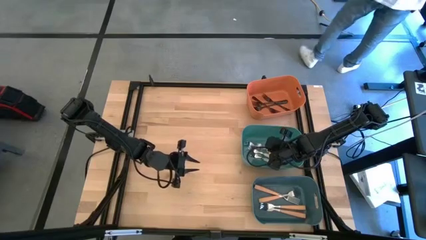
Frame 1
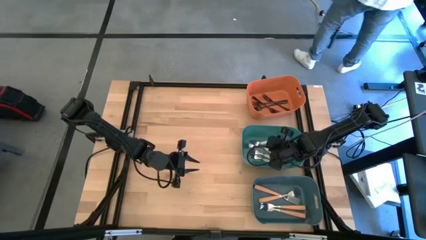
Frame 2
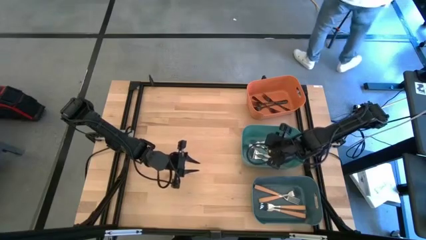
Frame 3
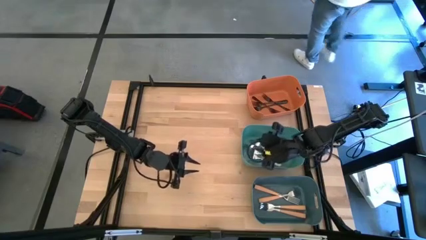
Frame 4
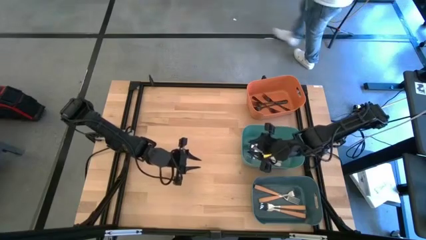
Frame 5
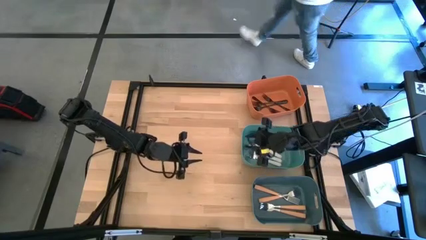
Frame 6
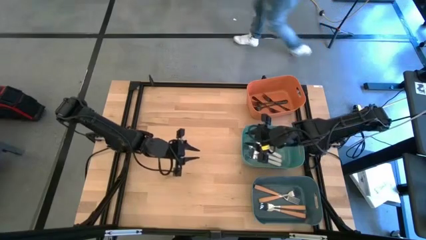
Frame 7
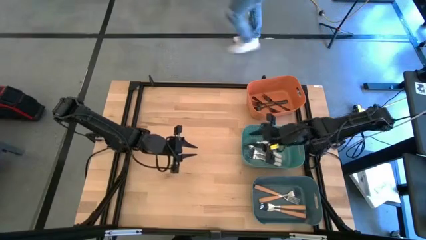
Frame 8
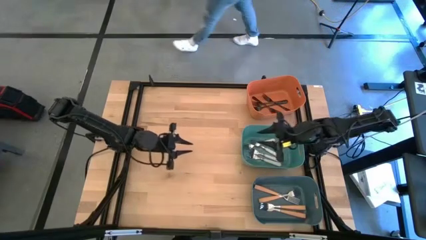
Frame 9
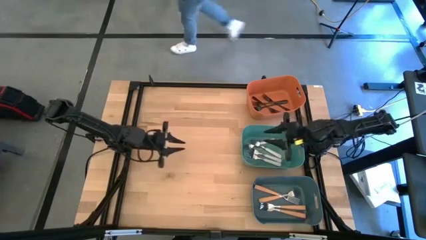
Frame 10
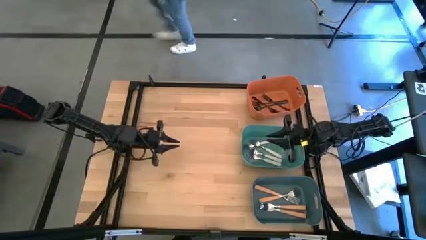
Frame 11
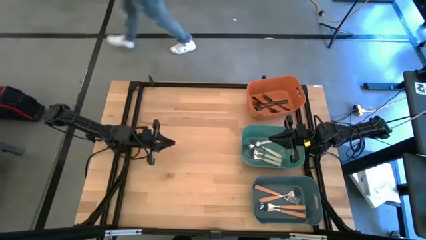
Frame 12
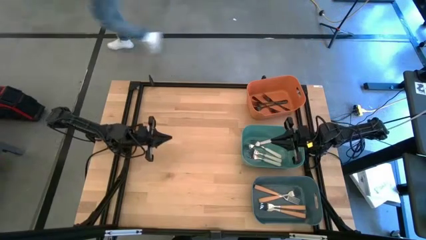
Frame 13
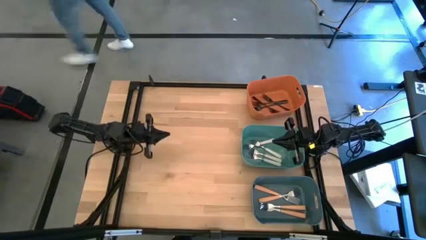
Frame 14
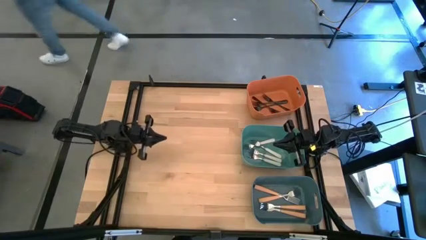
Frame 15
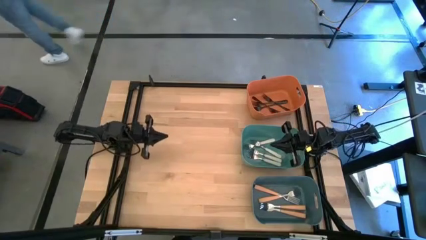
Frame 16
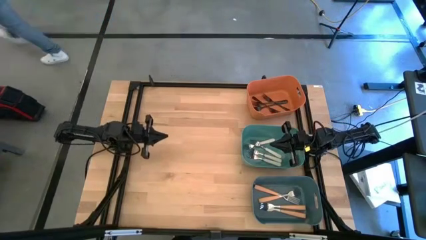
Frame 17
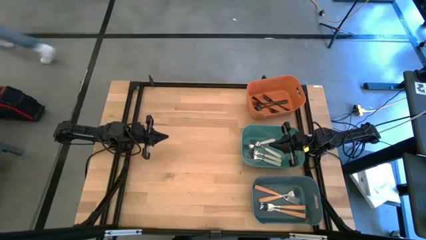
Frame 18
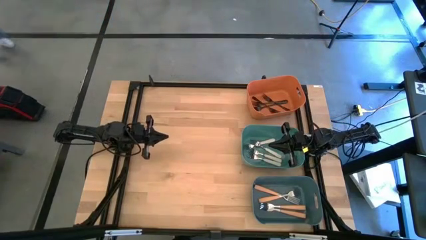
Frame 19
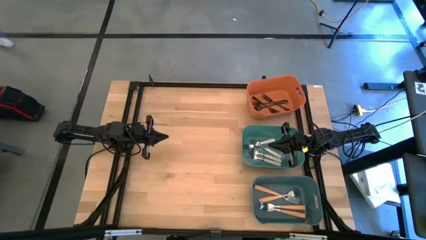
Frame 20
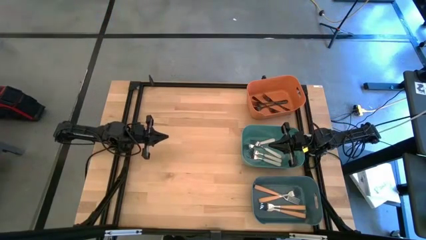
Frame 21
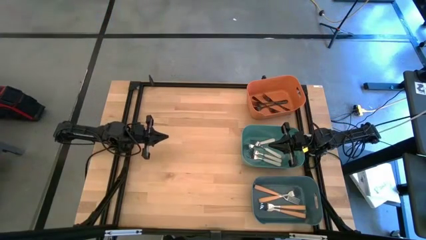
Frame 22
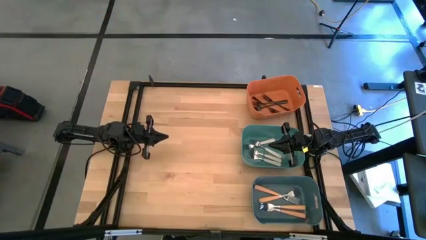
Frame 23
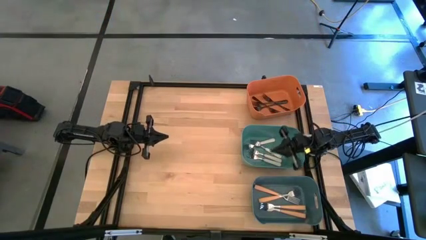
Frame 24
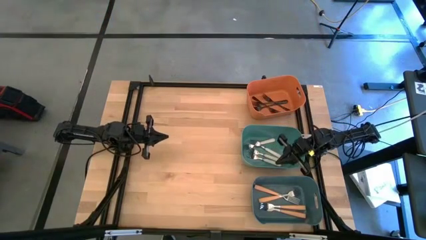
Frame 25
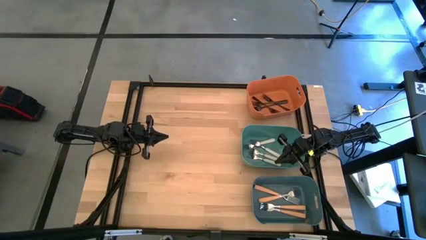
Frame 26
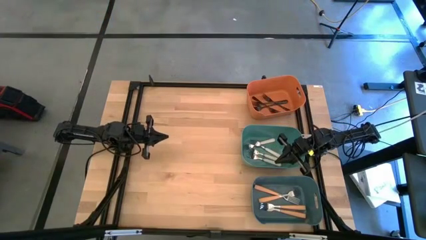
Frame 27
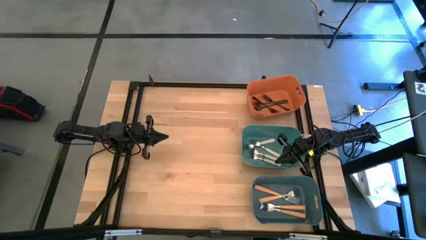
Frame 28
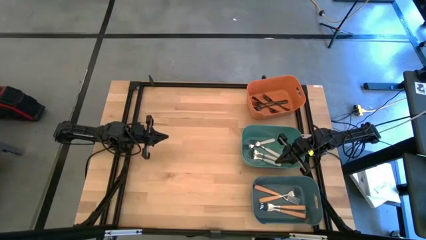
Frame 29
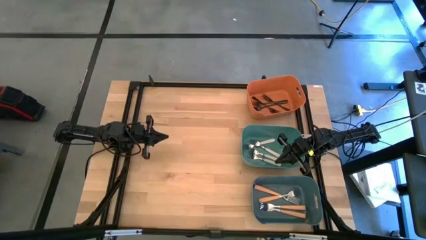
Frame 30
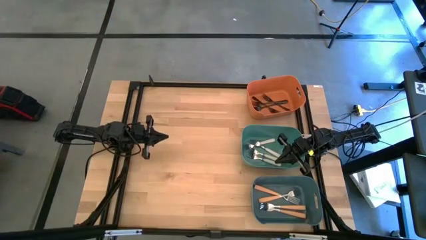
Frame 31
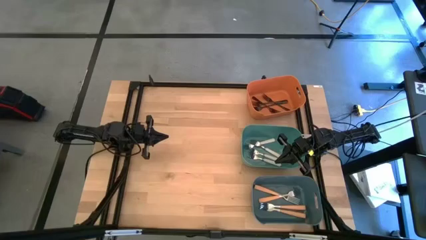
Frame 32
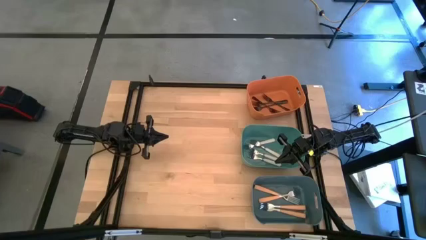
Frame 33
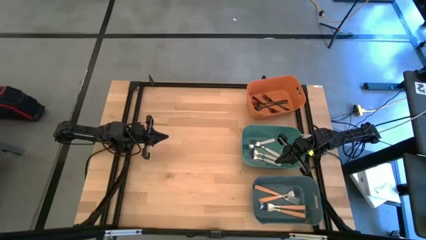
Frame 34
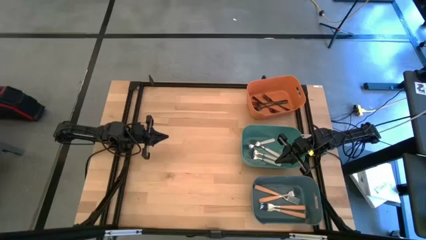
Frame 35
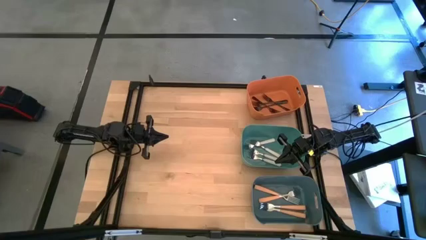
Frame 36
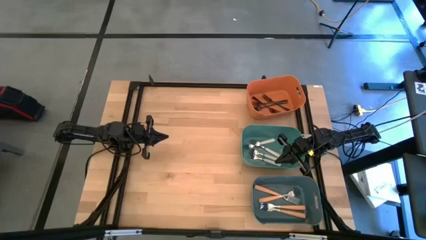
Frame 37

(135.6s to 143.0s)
Task: Sort silverware by color (type)
Return to Home Position

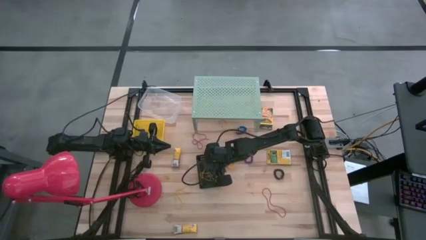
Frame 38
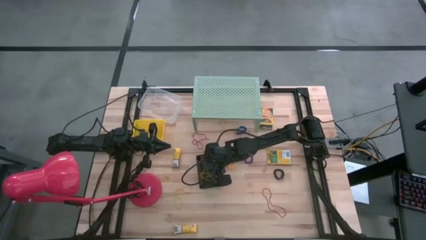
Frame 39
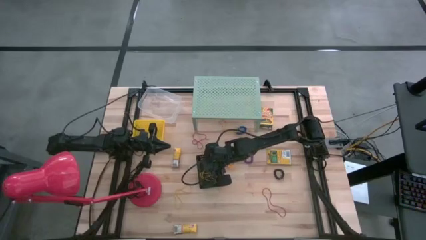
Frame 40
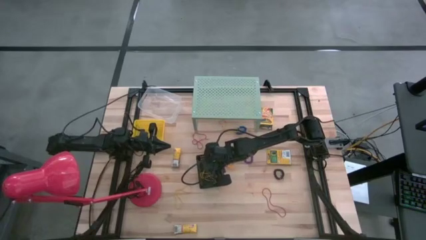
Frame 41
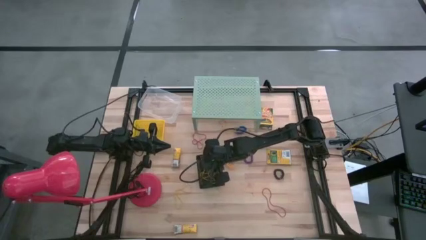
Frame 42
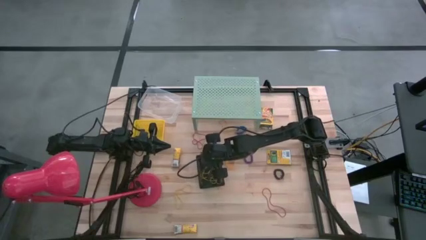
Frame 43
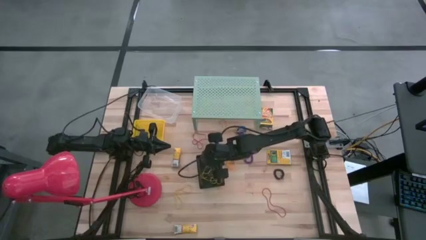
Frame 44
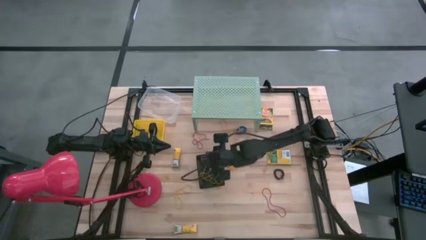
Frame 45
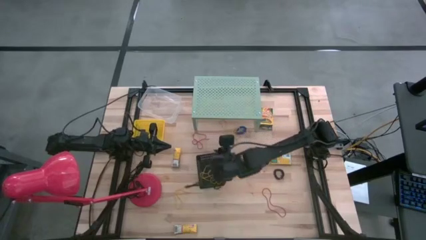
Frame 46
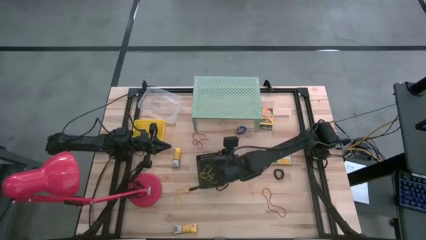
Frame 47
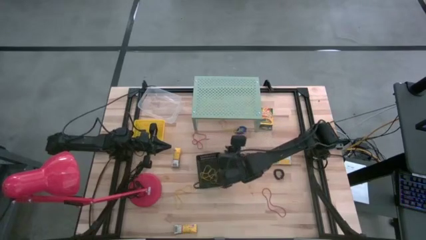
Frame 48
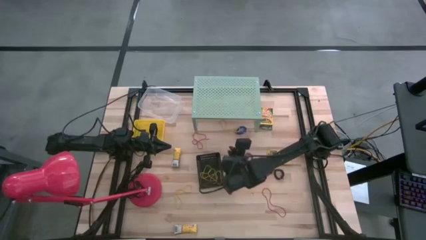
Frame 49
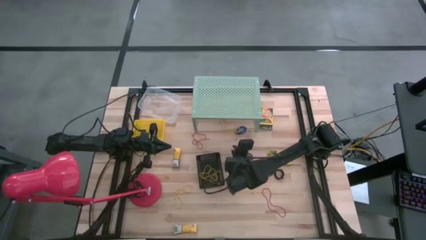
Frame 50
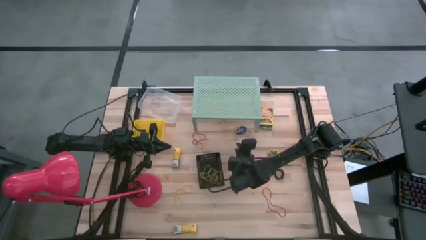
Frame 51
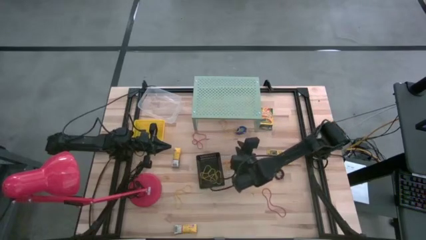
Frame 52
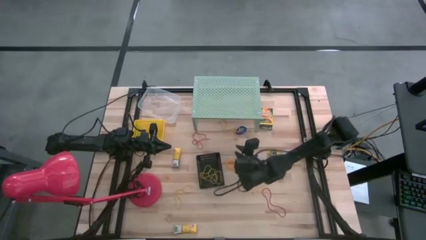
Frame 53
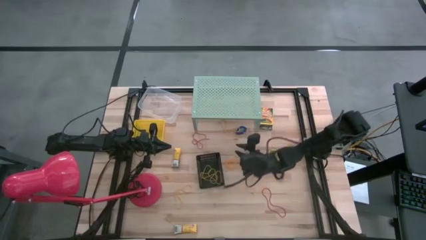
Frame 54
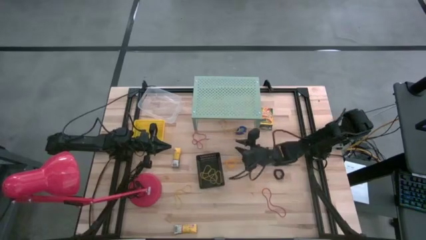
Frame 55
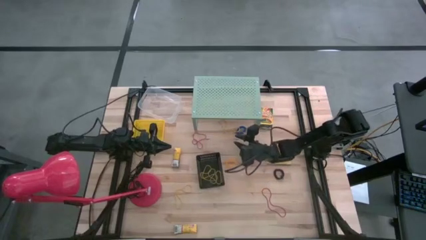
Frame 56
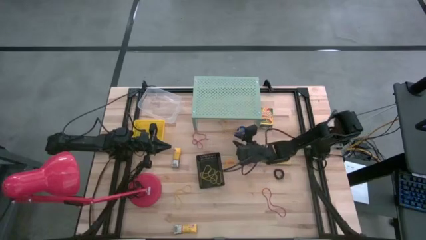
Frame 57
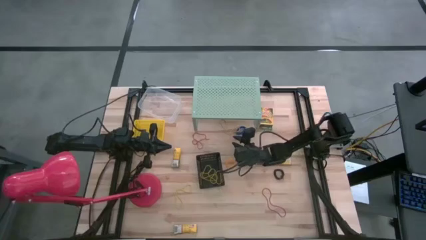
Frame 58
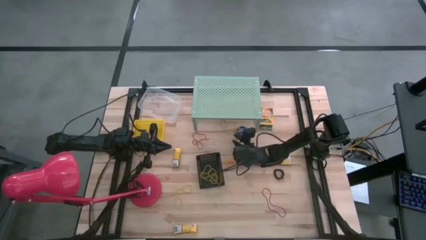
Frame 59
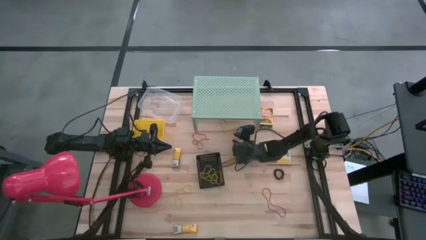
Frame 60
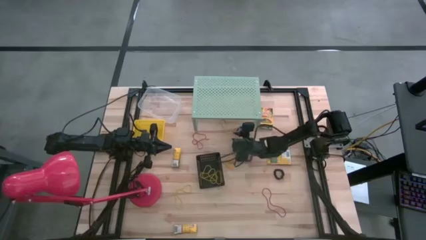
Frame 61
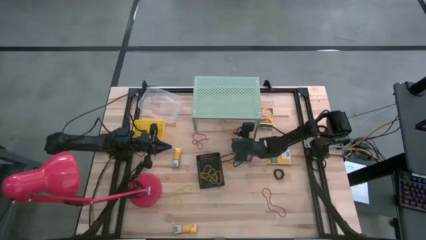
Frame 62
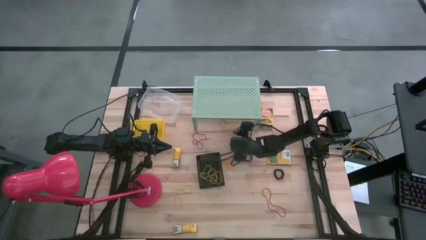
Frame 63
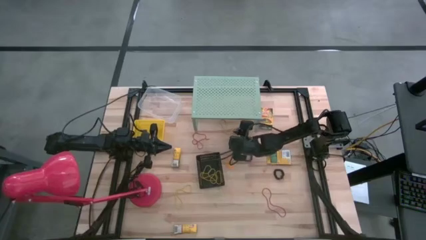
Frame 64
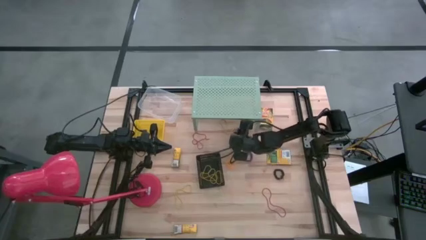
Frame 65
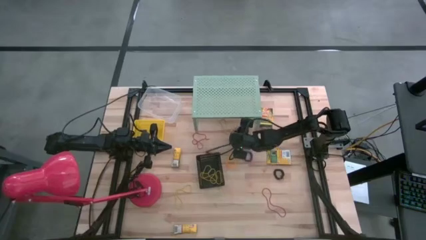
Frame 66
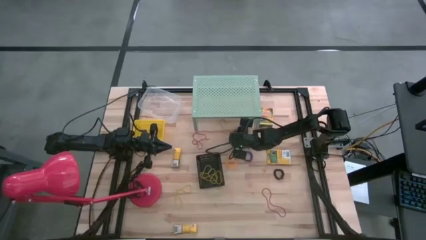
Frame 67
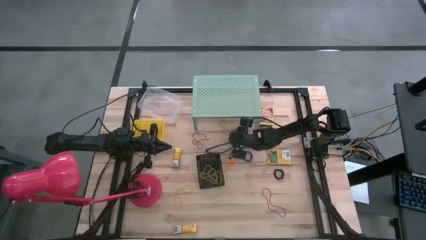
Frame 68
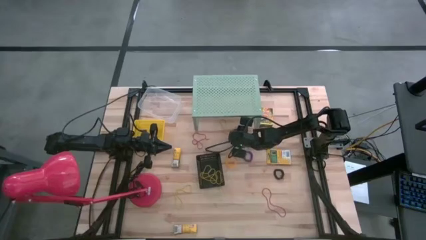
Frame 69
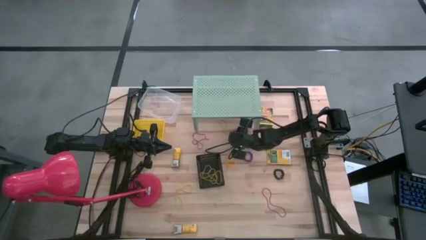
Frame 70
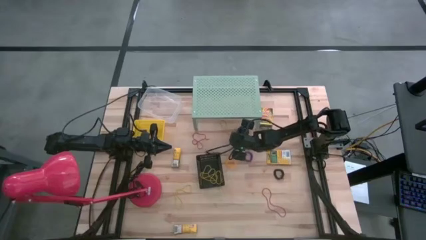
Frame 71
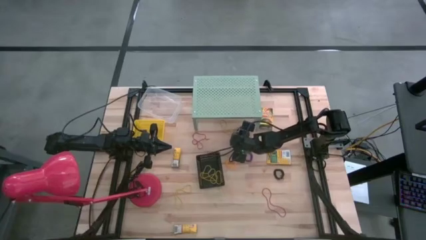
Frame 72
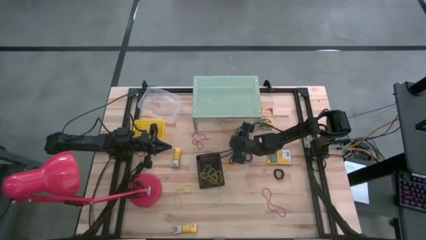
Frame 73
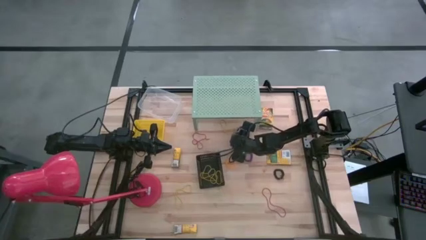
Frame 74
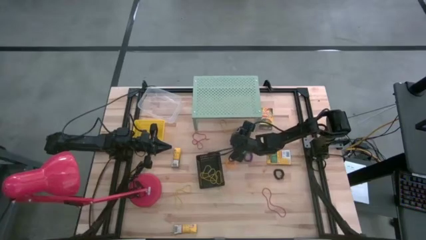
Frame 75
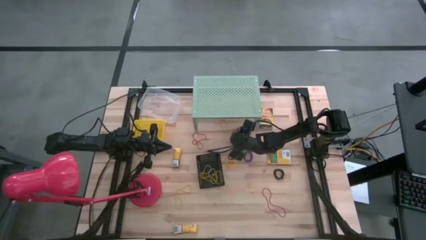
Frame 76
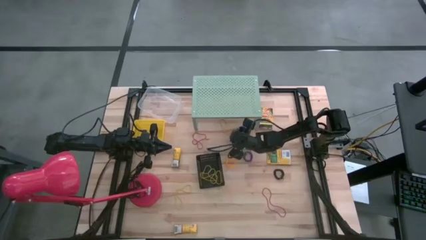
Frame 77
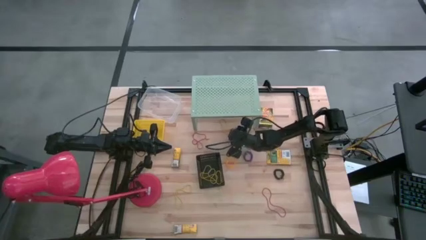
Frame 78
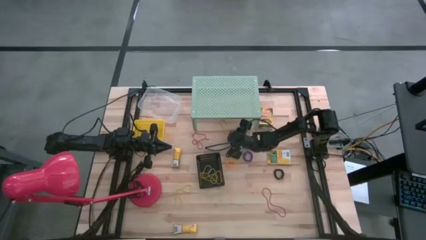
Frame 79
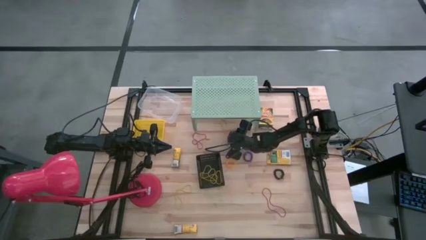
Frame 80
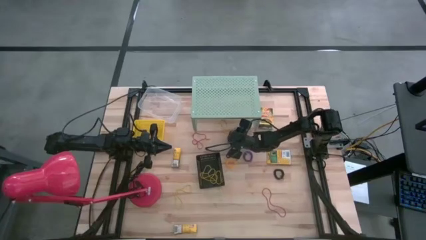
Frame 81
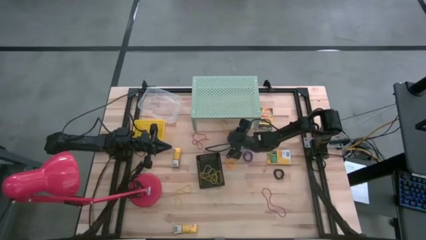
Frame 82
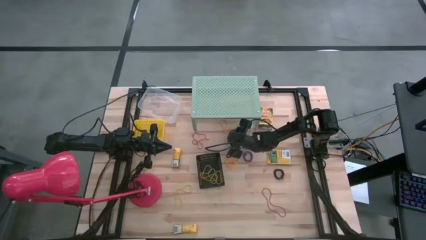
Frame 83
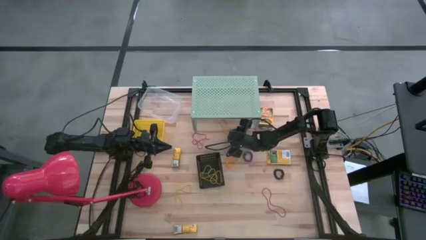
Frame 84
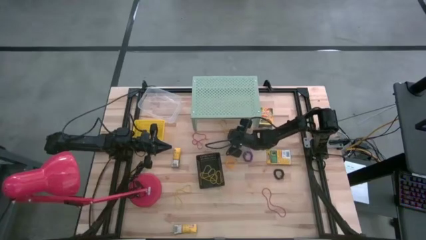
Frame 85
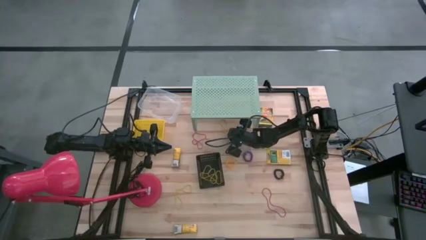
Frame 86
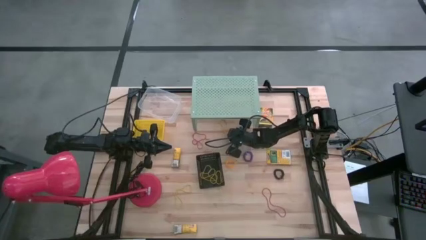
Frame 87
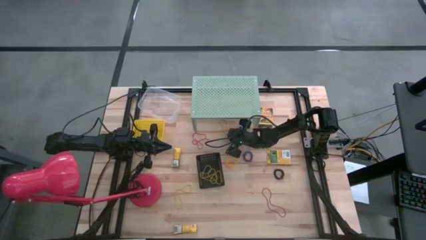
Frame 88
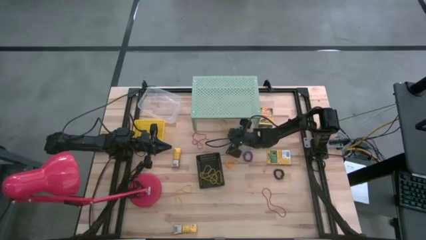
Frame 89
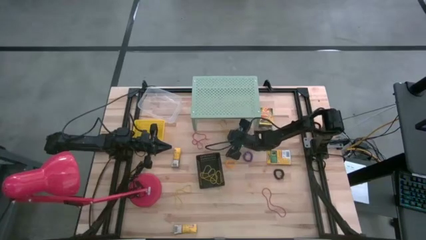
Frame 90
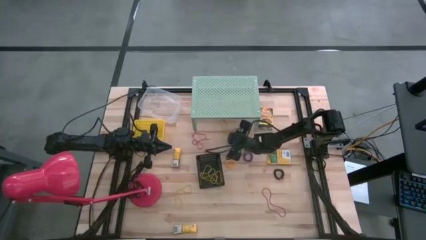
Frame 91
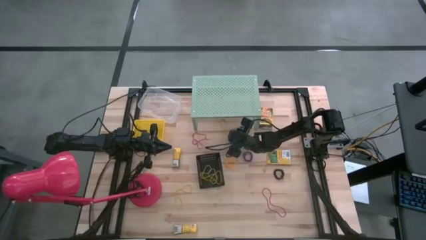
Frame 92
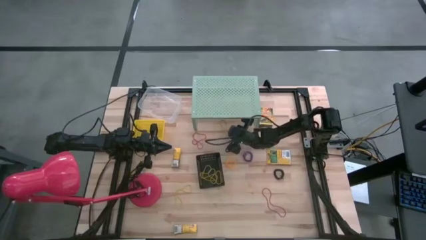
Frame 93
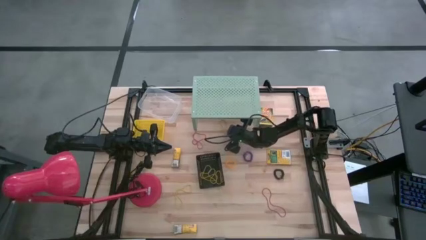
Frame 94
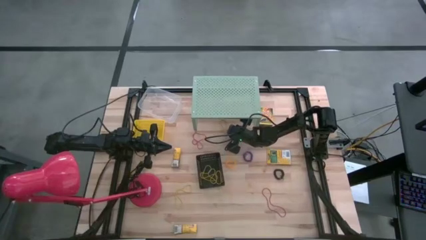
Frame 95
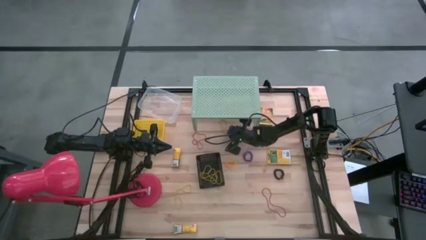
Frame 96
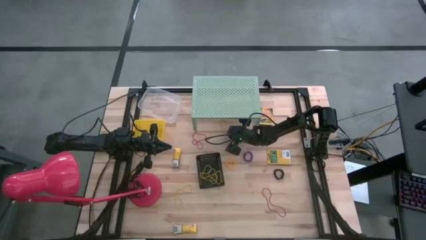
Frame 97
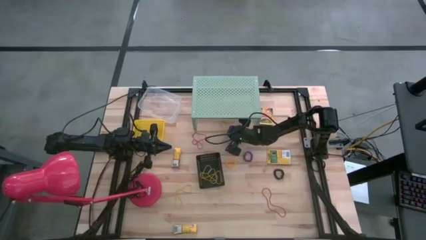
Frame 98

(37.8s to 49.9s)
Task: Pick & Place Office Desk Supplies
Put the yellow rubber band into the black bin
